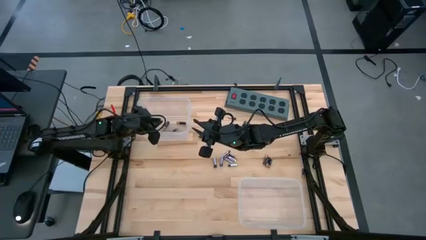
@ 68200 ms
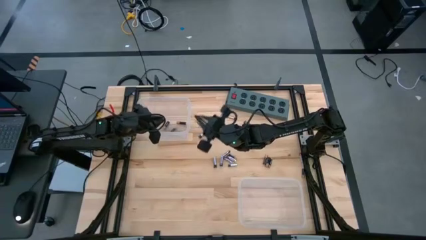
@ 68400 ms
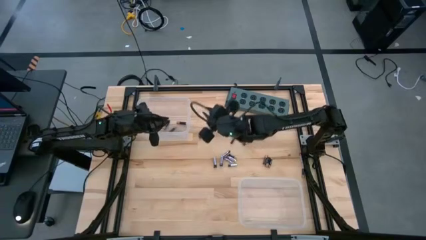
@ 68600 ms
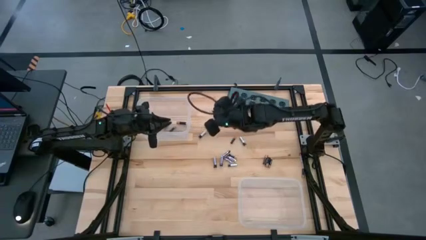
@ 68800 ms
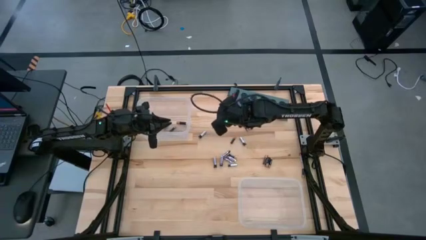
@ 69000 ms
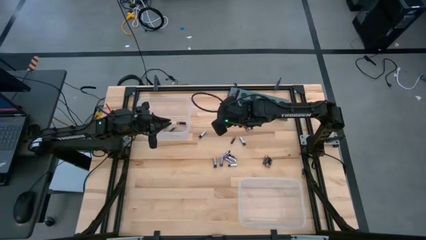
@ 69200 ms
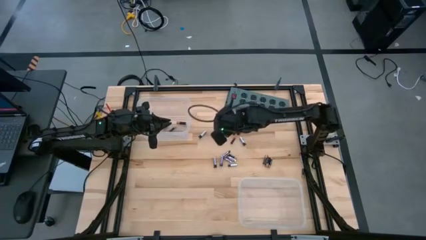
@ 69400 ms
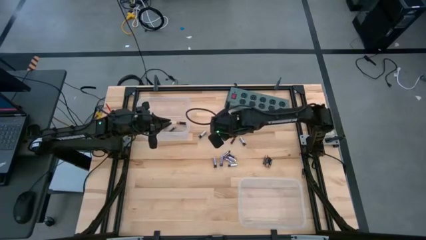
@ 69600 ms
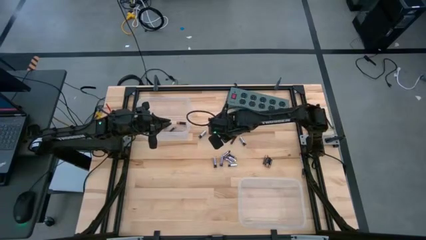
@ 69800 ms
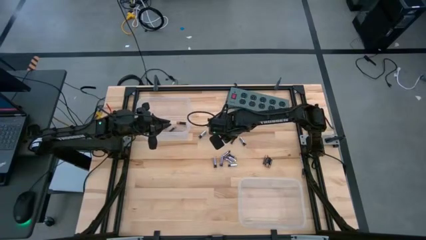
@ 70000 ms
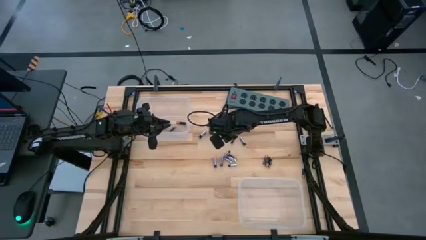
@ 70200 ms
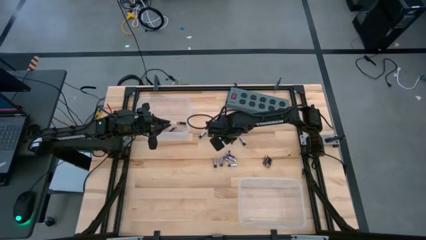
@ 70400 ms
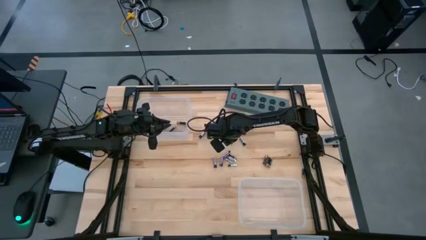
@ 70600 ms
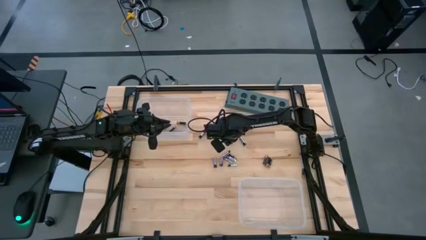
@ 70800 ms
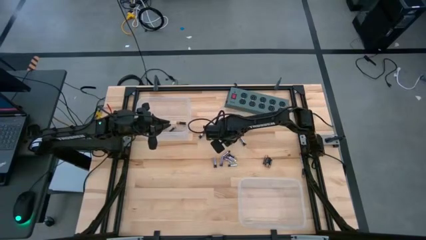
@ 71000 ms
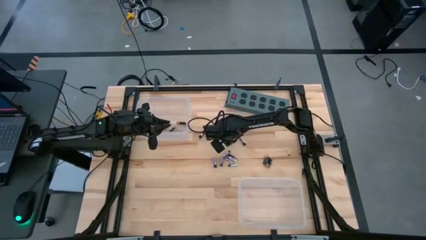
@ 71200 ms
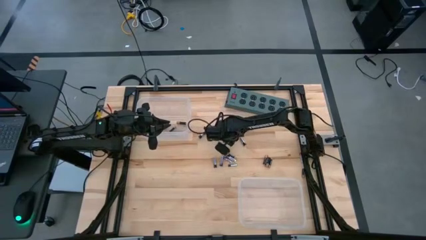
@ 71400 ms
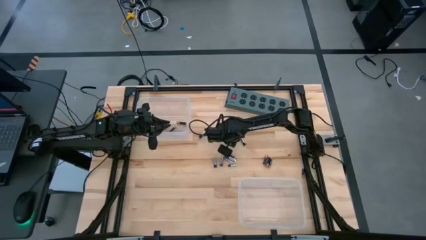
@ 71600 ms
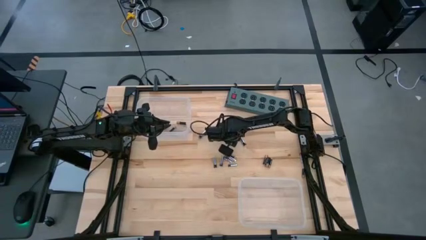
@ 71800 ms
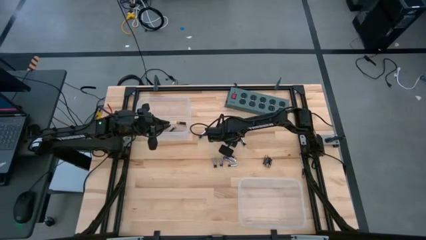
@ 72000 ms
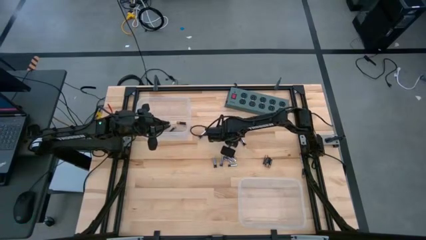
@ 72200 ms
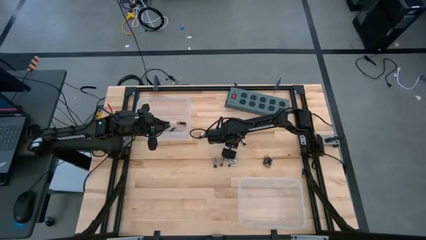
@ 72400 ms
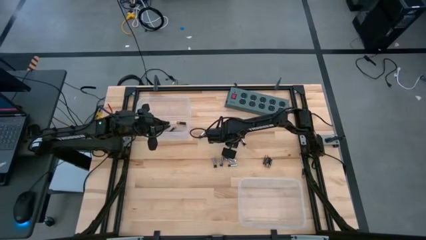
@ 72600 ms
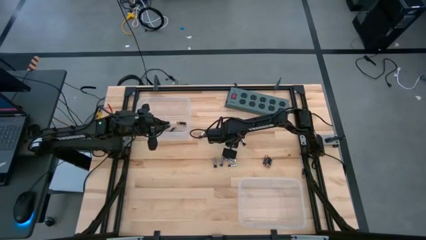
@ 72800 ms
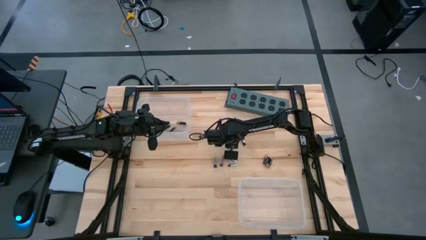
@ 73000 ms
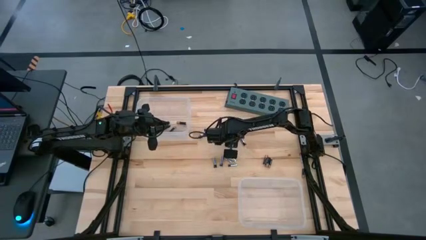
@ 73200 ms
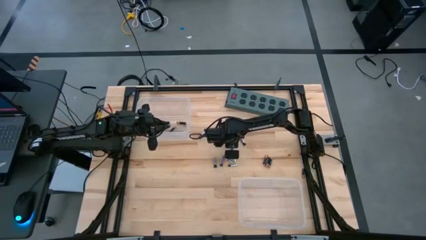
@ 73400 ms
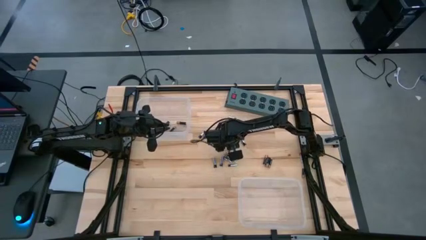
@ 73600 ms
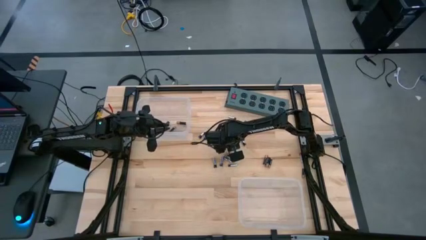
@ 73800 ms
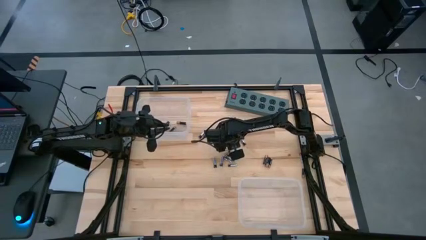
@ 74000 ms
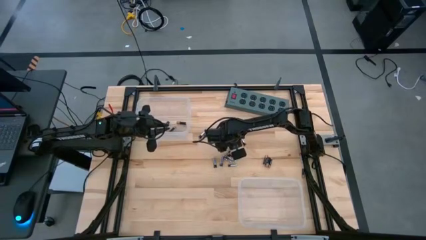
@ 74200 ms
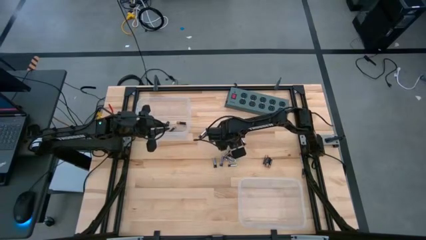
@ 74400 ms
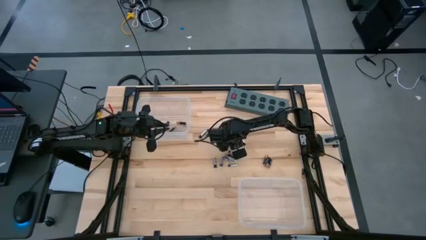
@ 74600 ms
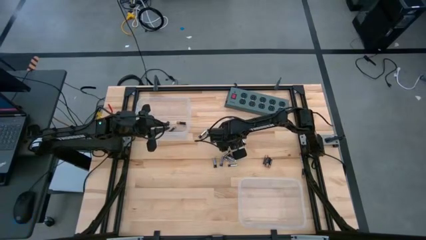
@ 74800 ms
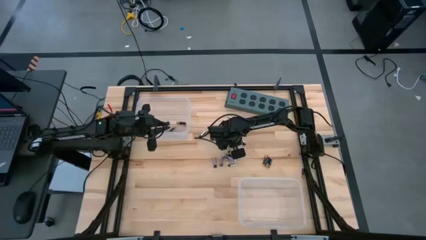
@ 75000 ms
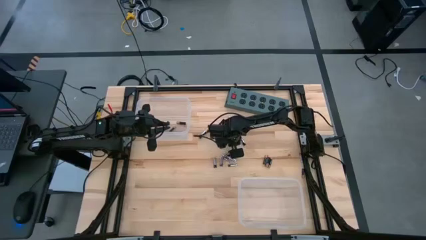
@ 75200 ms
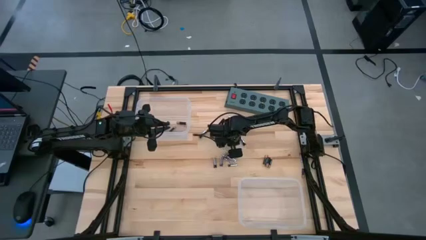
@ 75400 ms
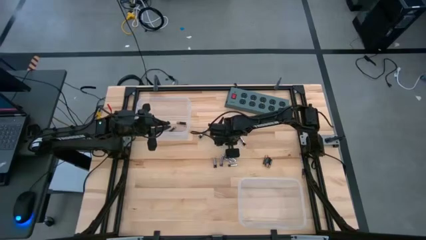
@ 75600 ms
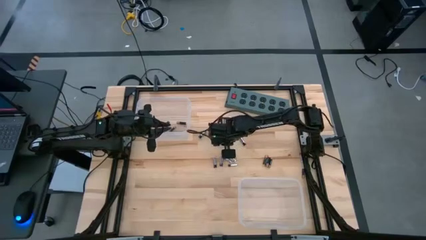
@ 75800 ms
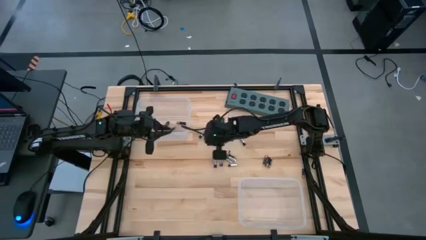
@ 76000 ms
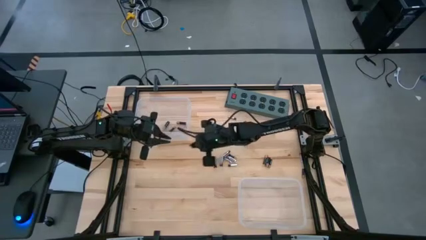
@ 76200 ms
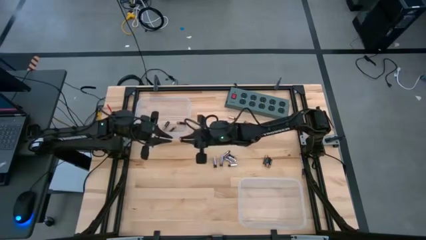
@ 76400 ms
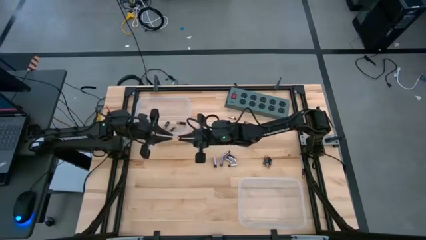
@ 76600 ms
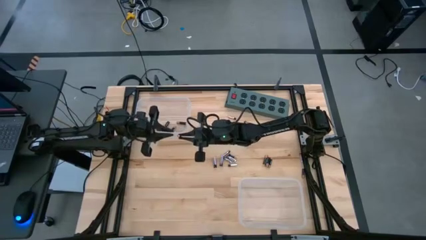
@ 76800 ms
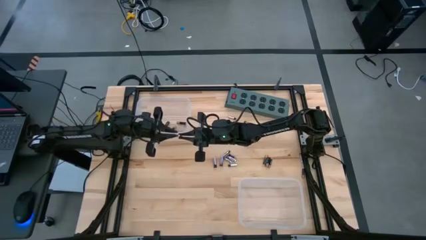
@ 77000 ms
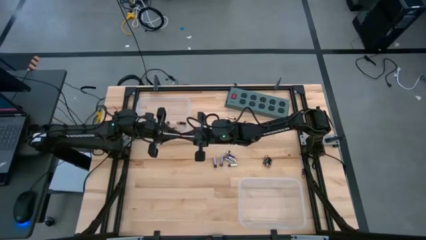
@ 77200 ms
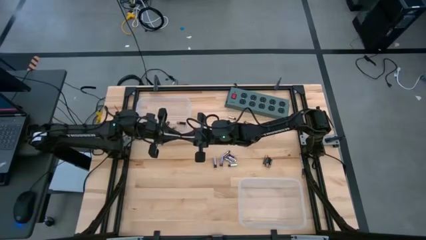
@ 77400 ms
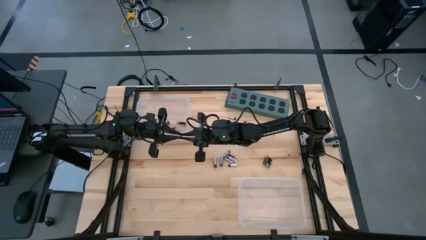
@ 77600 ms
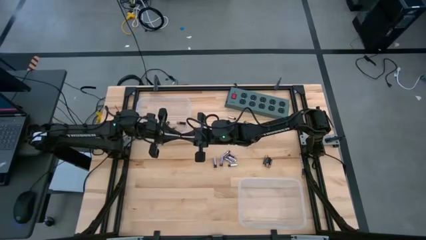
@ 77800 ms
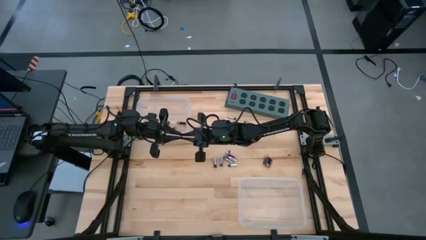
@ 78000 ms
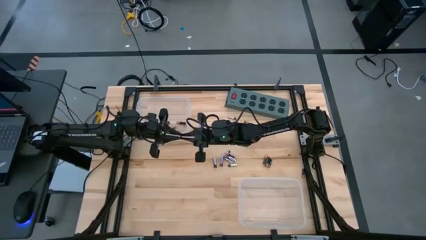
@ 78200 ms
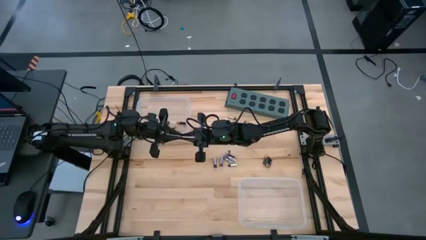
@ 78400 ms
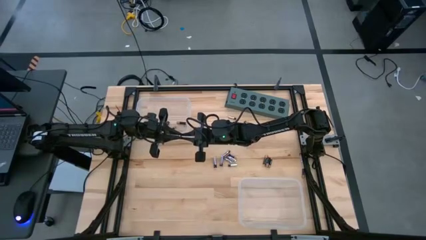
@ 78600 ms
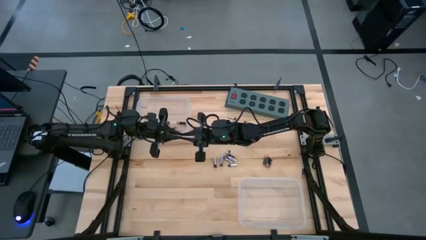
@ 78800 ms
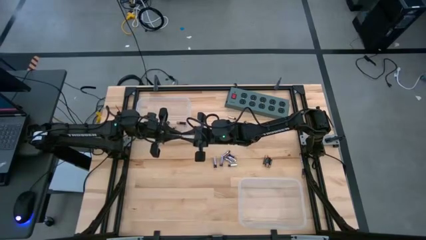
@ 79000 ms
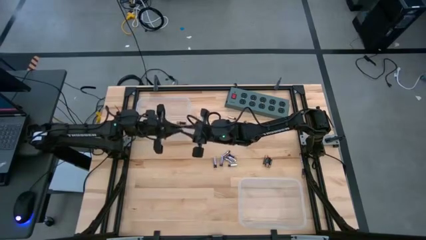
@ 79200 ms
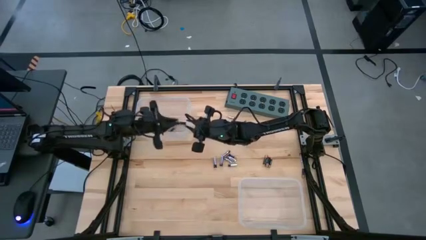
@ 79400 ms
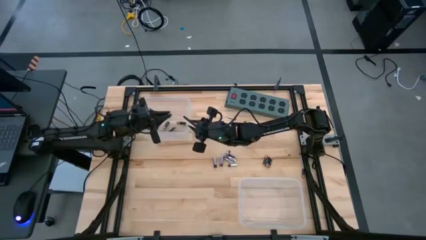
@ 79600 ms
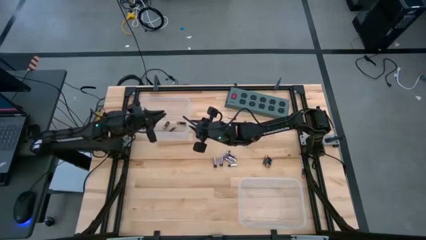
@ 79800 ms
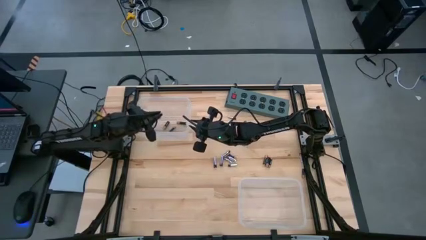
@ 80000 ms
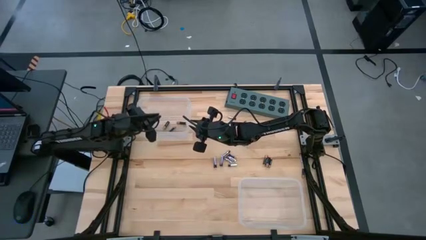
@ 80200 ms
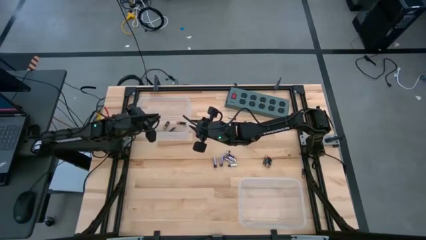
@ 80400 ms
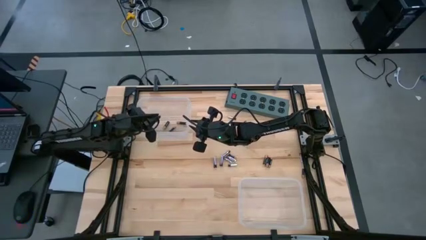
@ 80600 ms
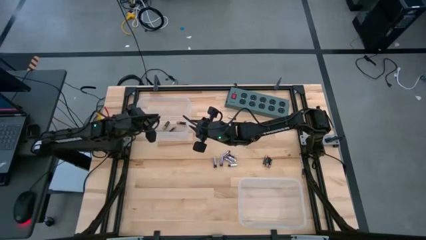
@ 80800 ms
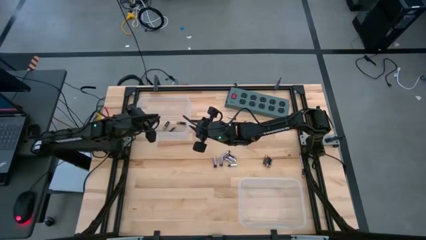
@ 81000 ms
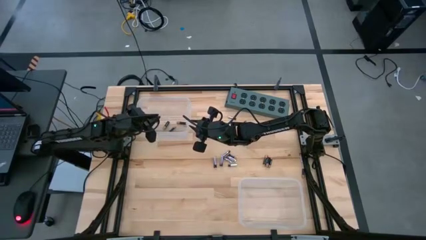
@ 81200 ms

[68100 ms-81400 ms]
Task: Sort batteries
Put the black battery into the top transparent bin
